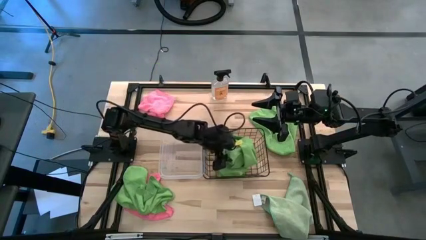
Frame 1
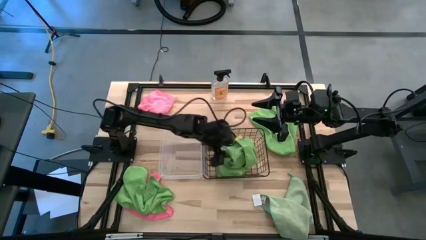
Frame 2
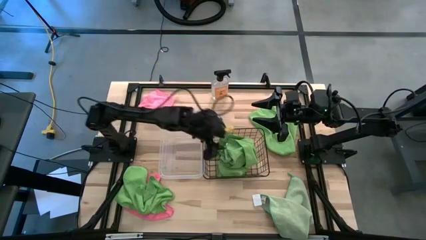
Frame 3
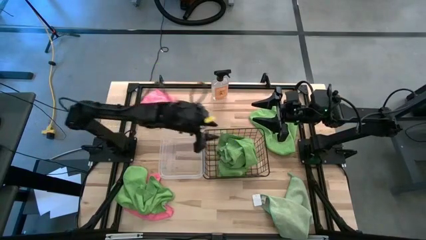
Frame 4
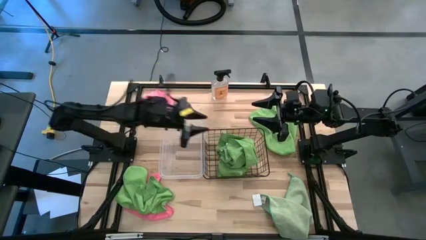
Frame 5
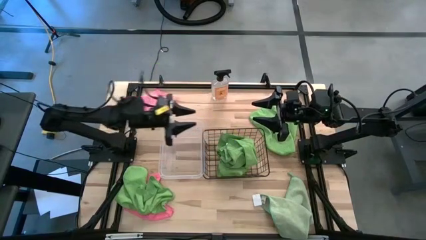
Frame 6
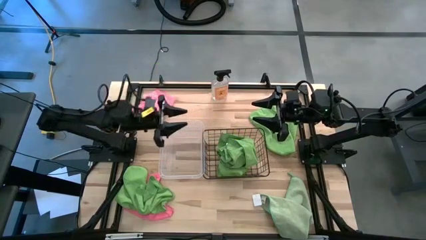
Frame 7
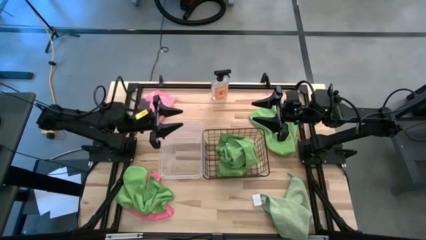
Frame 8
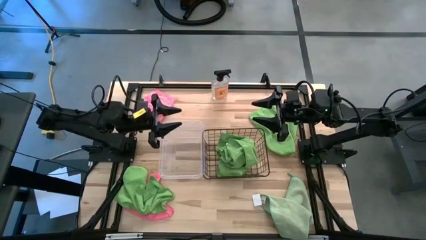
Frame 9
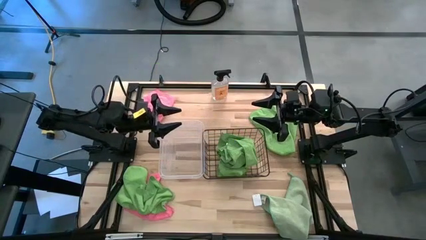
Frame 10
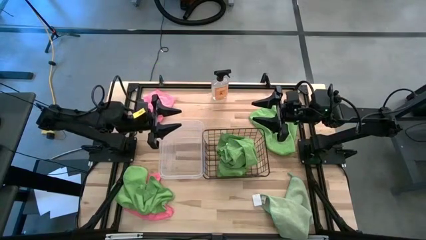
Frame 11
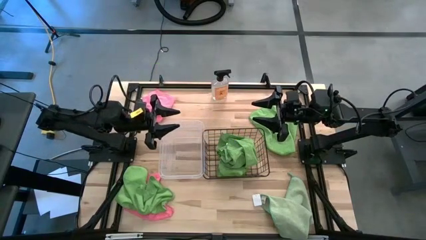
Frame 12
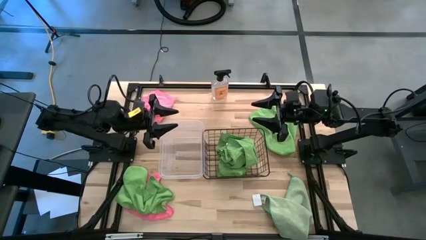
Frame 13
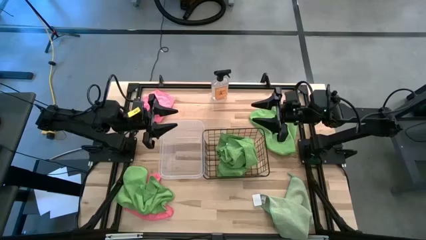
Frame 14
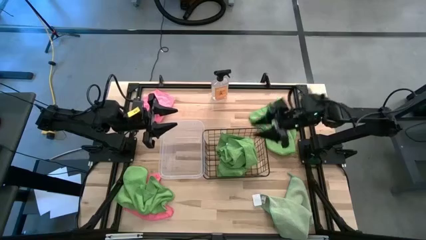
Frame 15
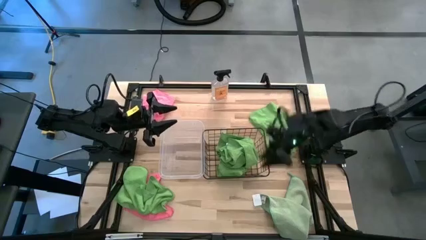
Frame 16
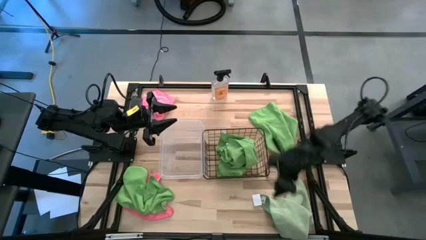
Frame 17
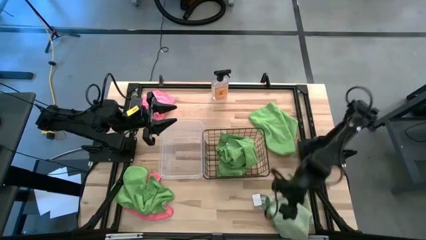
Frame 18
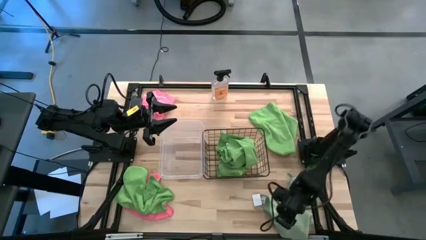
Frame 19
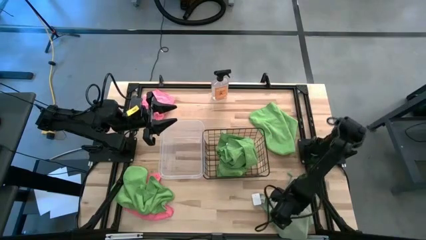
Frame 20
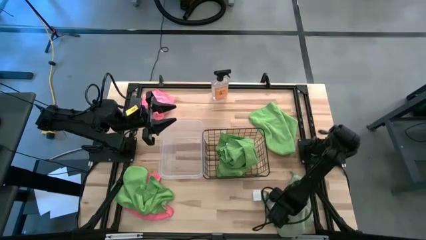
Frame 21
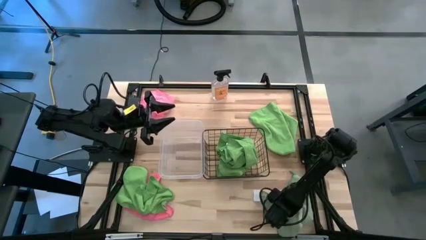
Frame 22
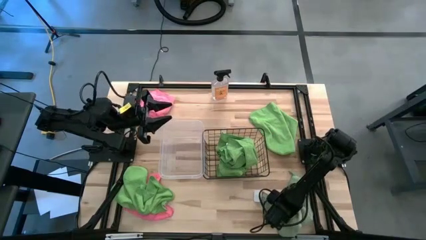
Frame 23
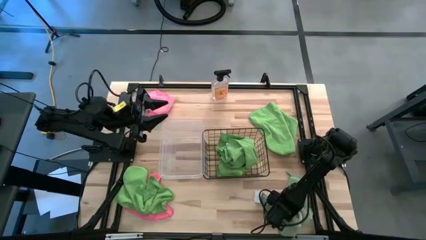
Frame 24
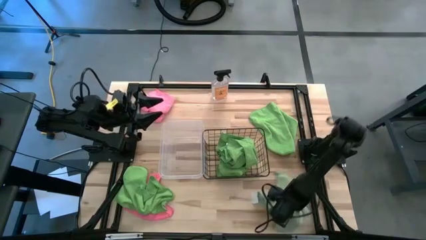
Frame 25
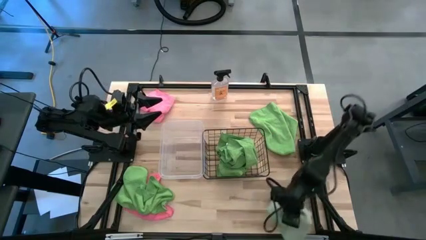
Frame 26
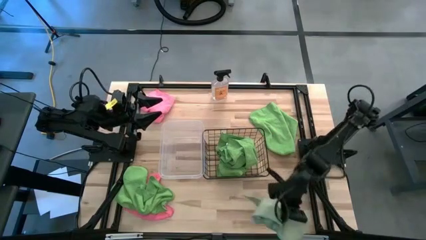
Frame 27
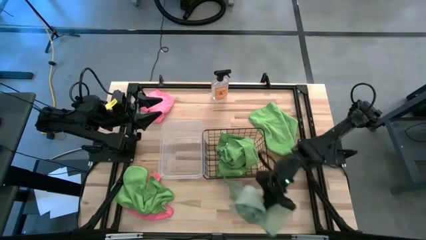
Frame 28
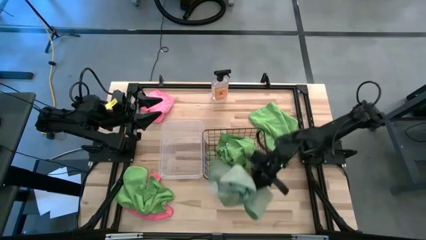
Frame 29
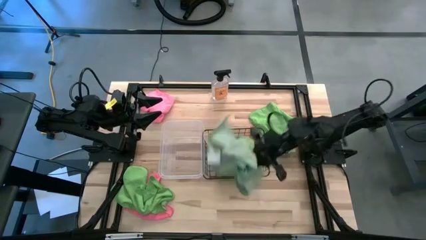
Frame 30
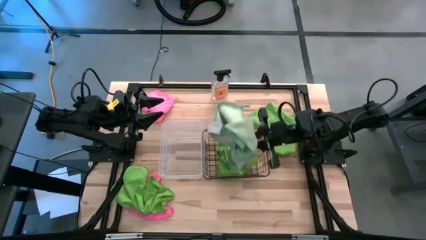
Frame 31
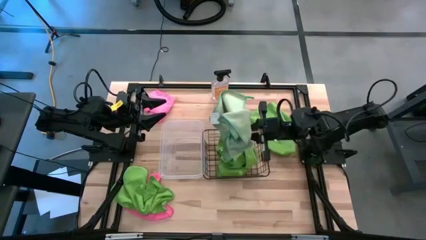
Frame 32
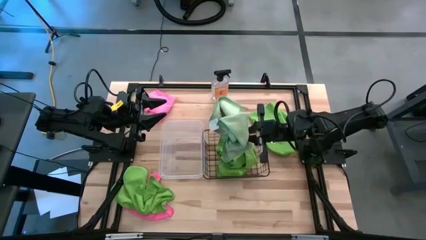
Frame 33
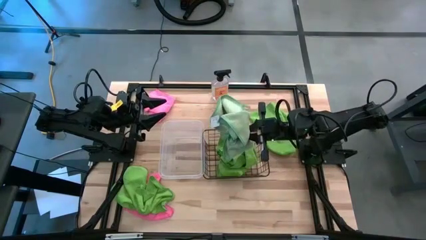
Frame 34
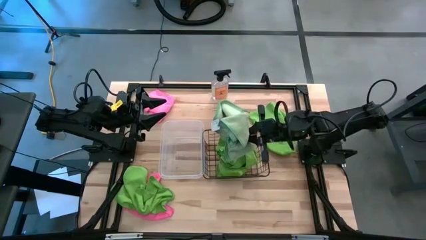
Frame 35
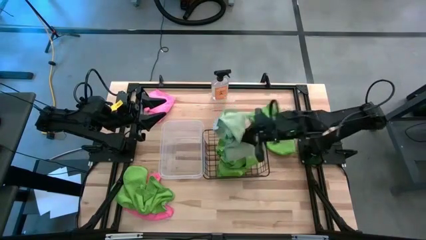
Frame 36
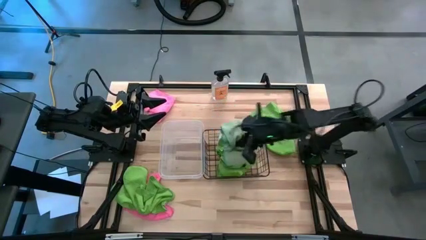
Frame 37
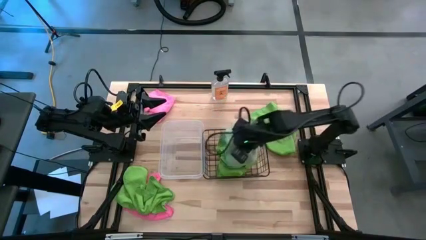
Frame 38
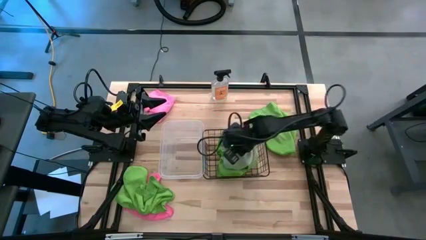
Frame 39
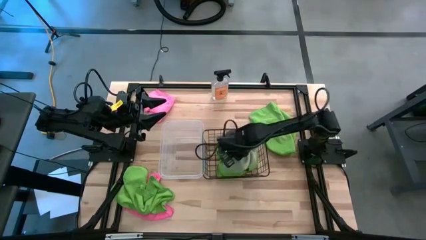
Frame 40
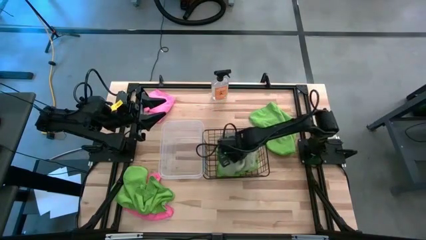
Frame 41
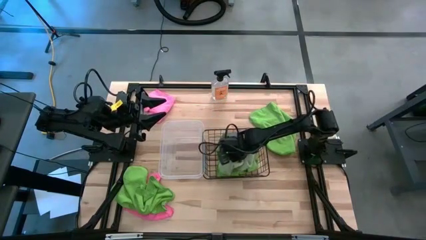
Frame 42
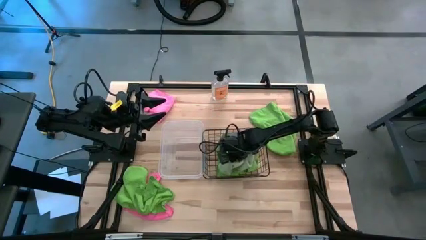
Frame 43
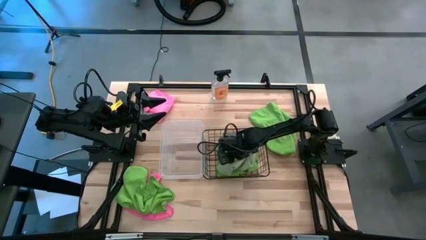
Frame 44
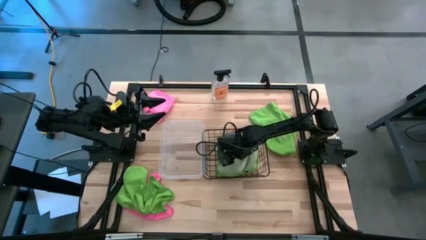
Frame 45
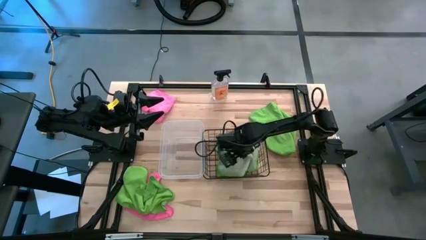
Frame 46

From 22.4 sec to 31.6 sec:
Task: Sort microfiber towel by color & place in baskets
Put the green towel into the wire basket

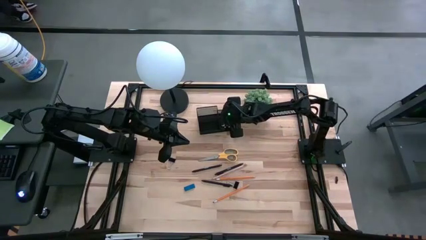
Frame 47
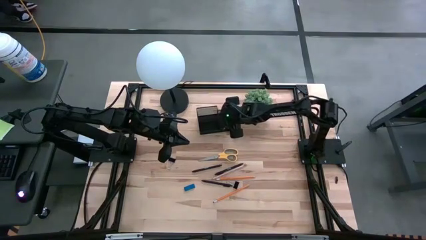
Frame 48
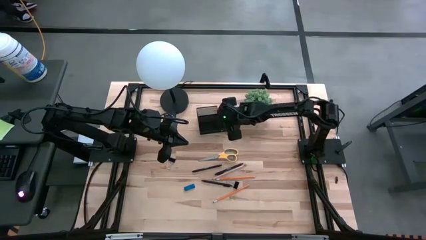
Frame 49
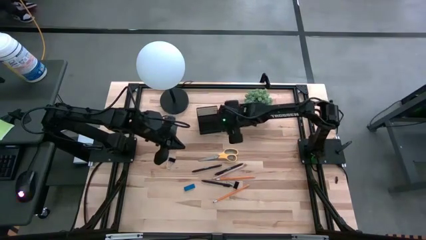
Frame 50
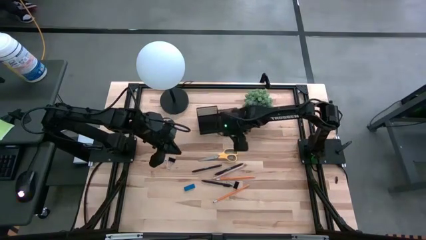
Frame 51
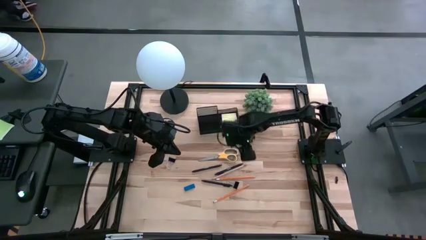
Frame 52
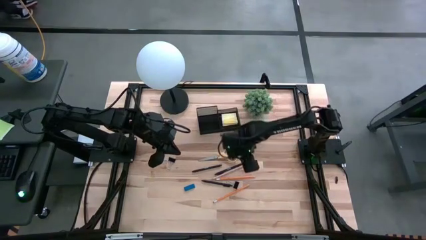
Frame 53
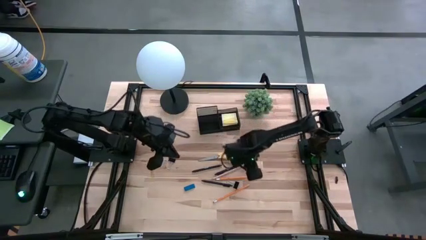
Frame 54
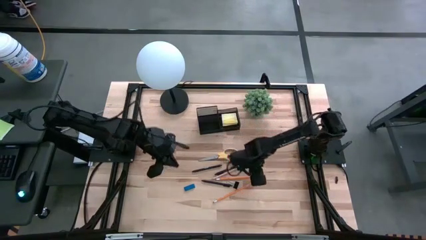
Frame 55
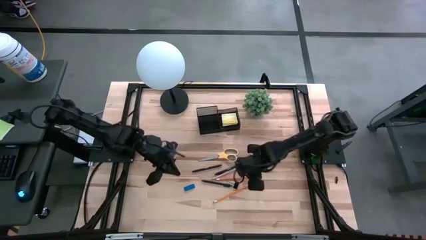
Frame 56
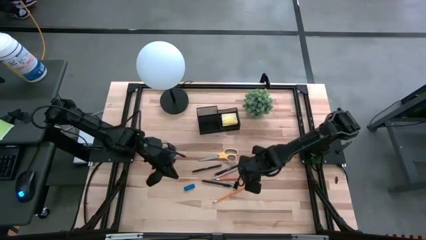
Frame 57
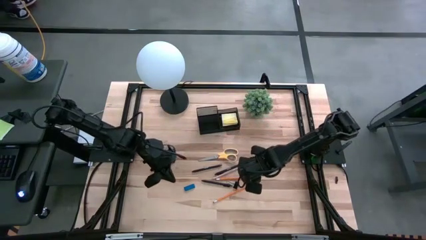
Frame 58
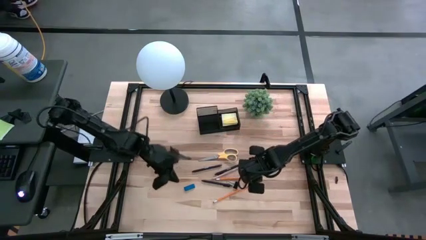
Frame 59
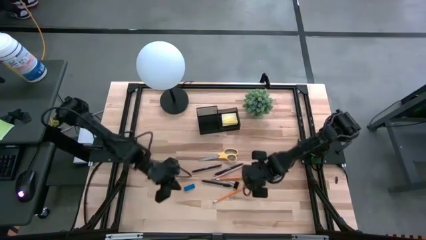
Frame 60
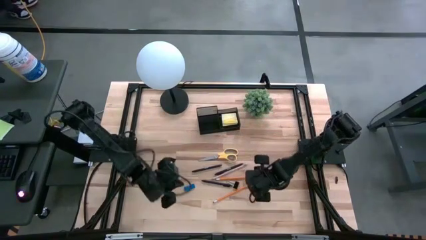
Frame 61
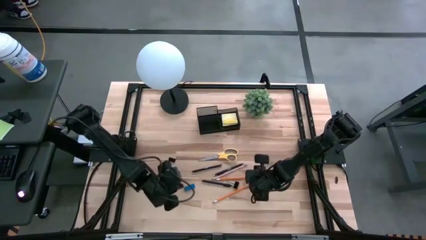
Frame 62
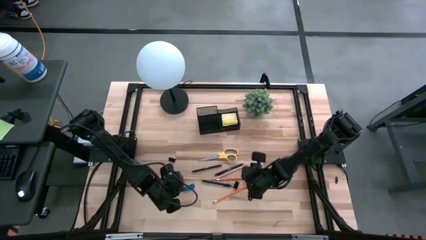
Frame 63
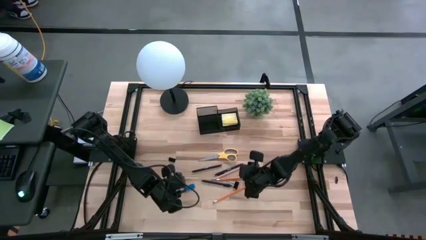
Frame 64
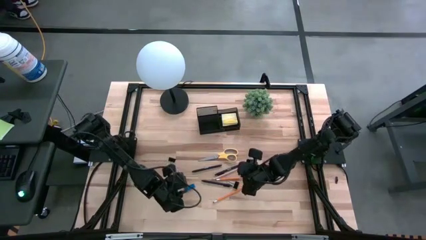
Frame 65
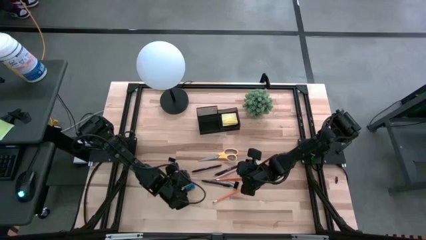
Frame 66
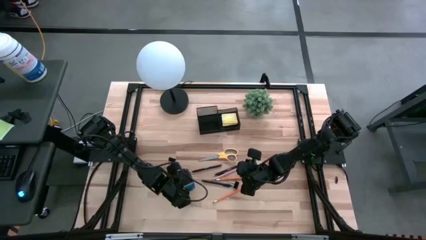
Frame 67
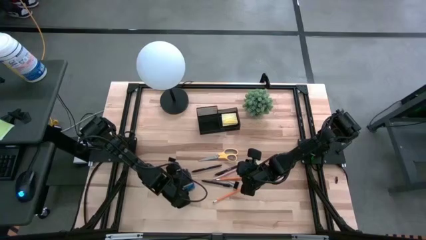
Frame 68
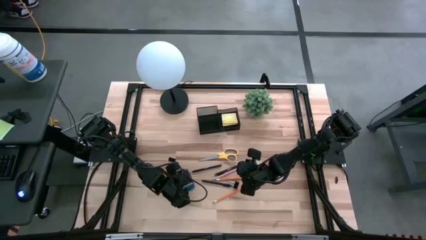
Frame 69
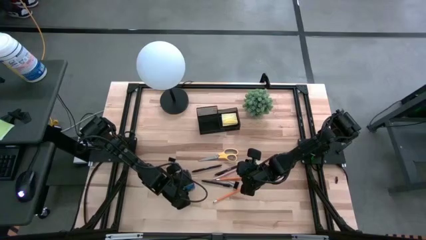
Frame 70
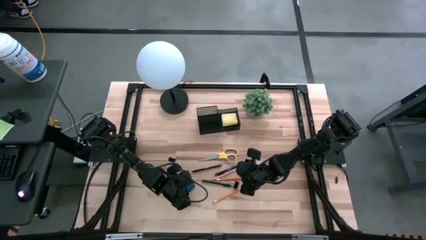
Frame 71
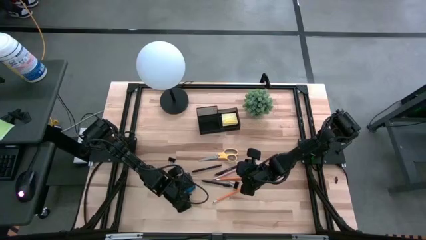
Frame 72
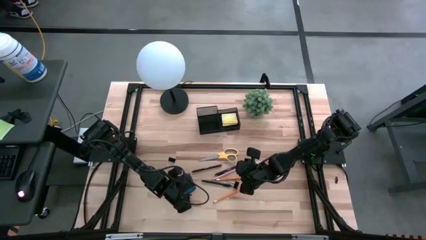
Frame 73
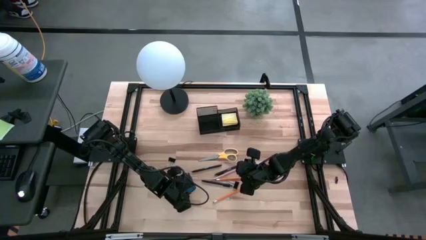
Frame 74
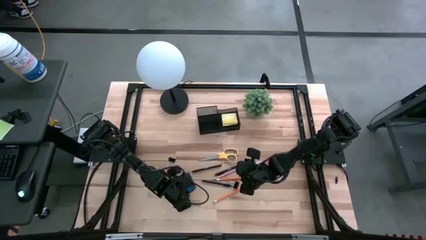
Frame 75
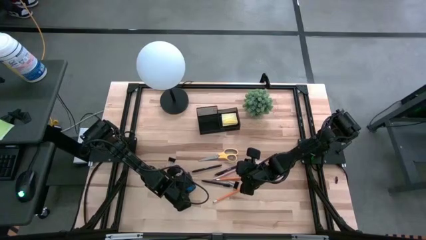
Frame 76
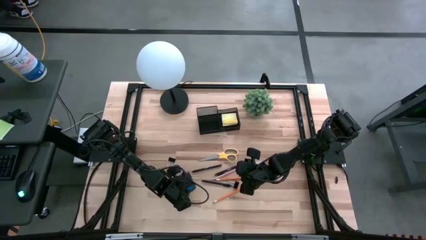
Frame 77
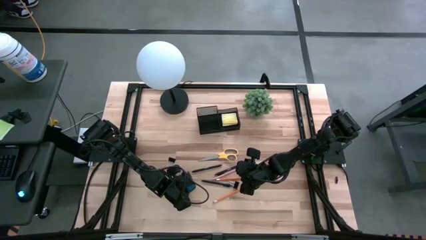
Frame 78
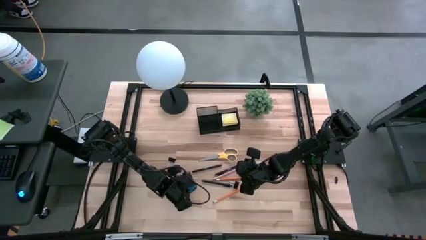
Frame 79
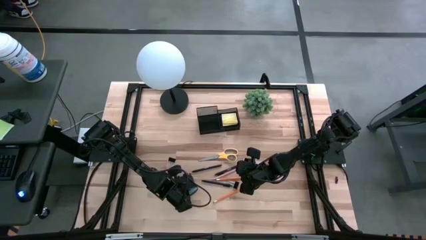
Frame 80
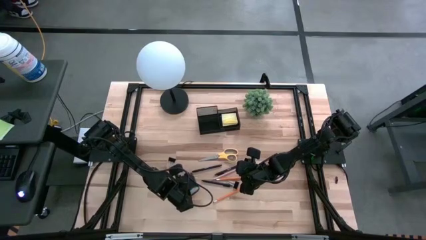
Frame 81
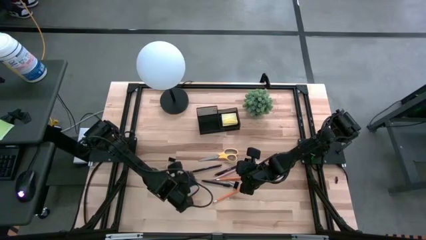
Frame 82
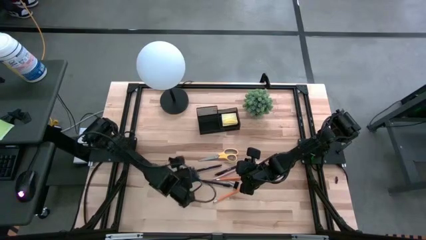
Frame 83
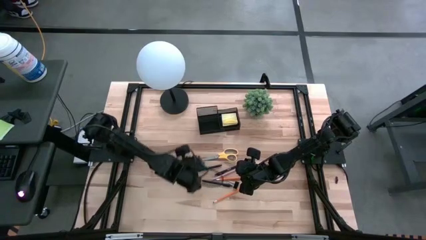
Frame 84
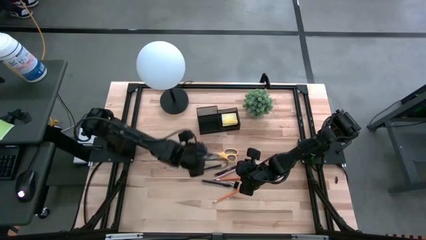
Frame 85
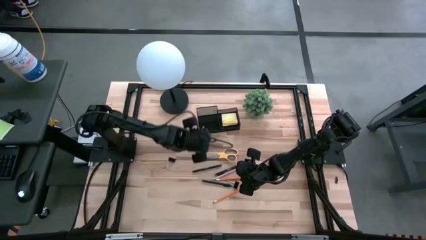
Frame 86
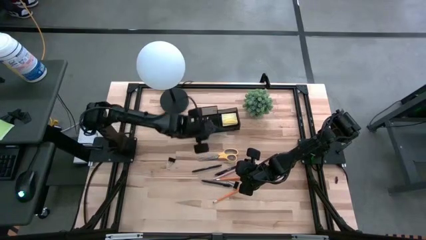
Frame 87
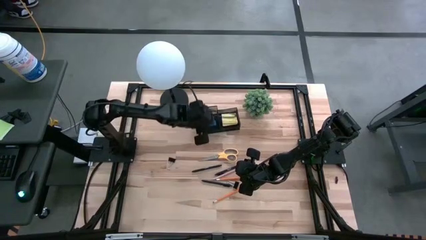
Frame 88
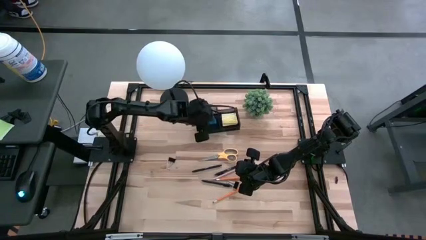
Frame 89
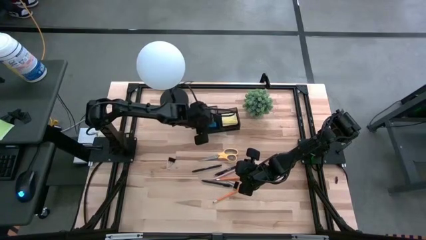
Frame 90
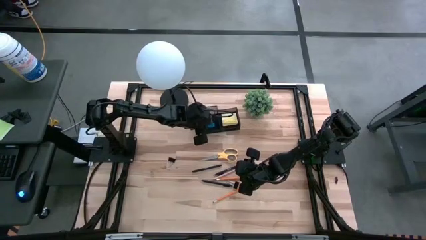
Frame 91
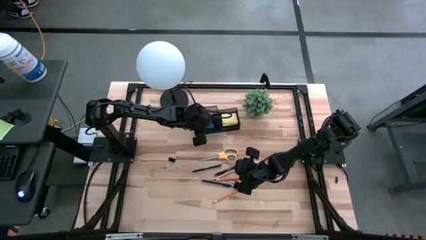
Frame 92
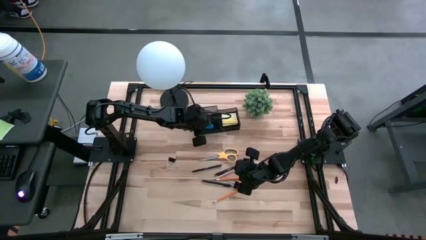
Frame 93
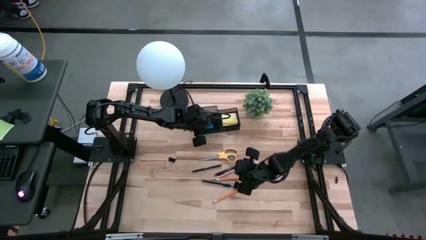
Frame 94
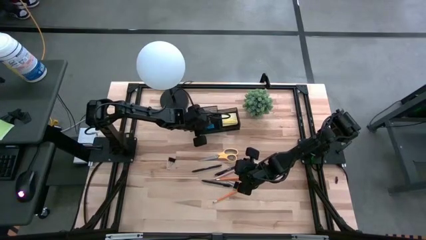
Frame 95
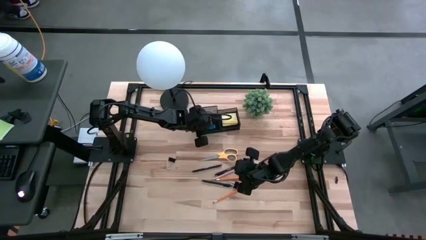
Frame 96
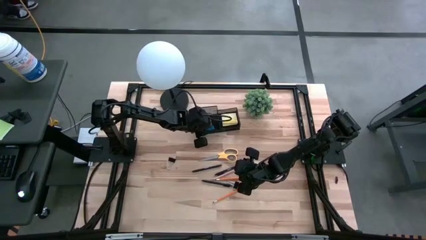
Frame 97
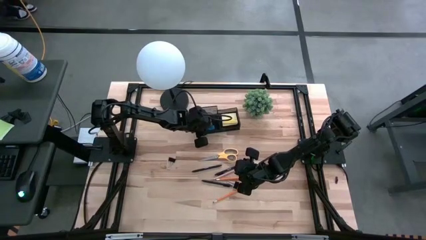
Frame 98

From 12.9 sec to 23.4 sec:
Task: Pick and place office supplies into organizer
Put the eraser into the desk organizer
